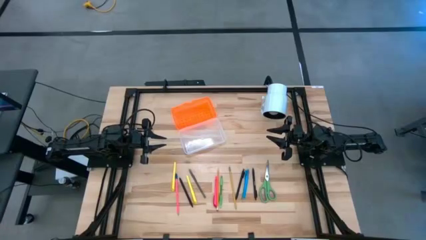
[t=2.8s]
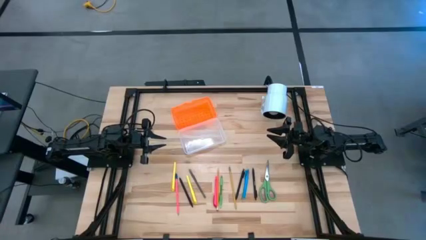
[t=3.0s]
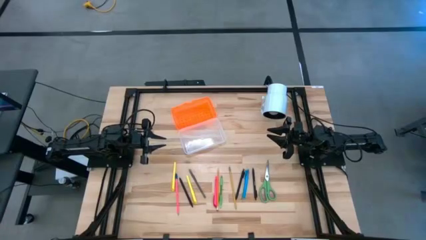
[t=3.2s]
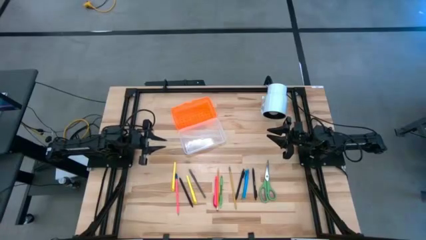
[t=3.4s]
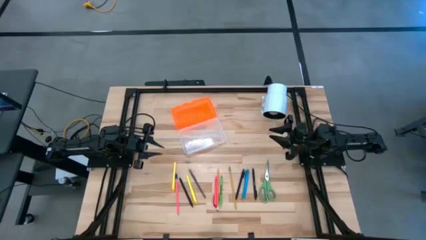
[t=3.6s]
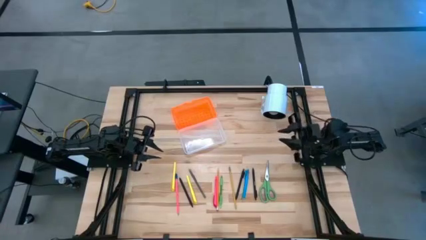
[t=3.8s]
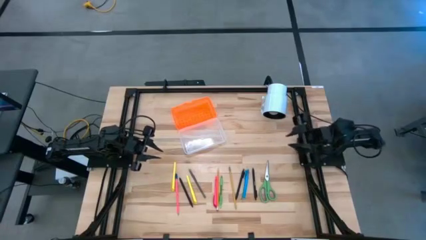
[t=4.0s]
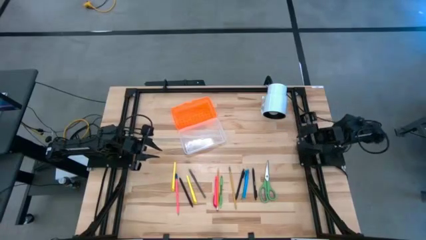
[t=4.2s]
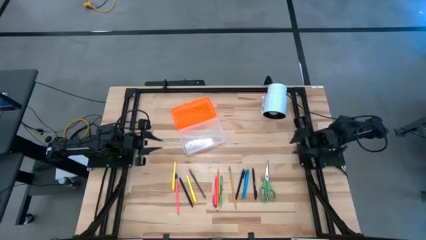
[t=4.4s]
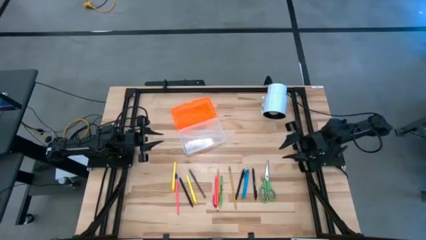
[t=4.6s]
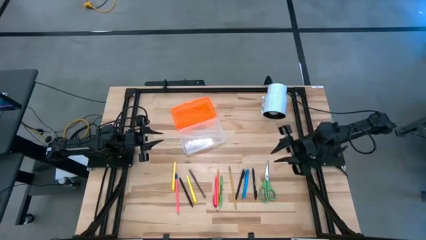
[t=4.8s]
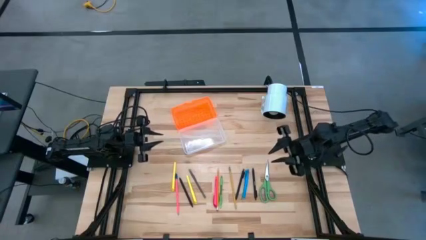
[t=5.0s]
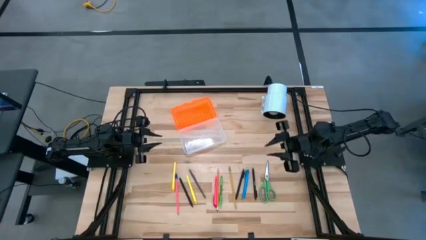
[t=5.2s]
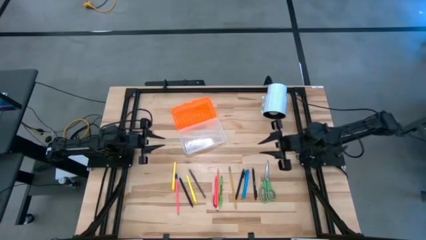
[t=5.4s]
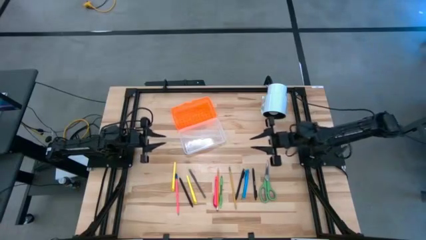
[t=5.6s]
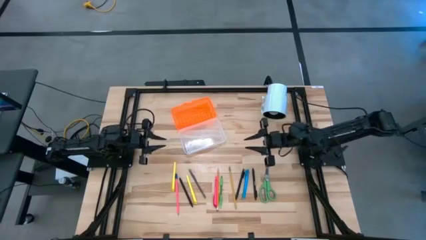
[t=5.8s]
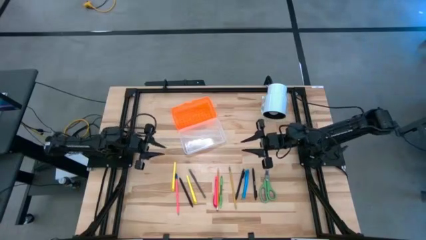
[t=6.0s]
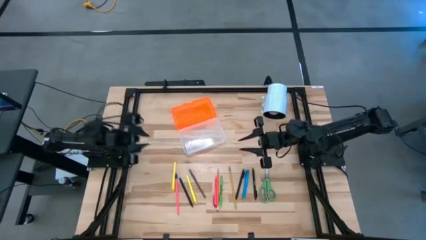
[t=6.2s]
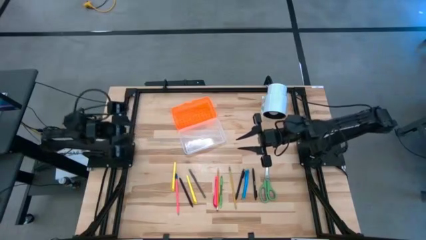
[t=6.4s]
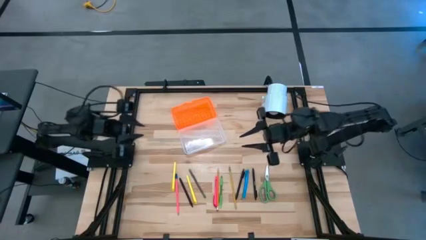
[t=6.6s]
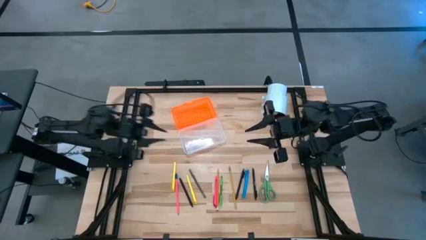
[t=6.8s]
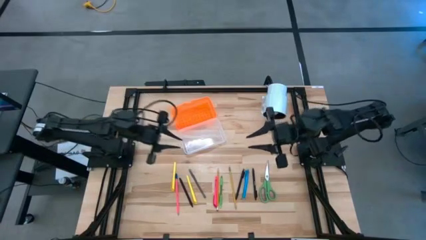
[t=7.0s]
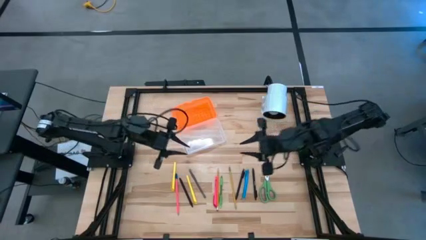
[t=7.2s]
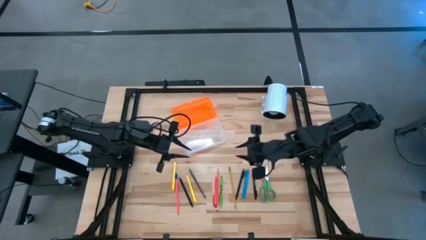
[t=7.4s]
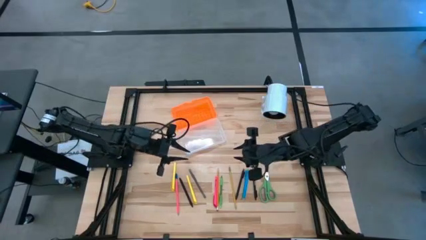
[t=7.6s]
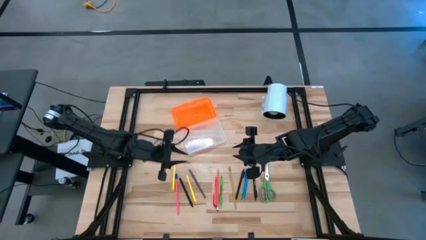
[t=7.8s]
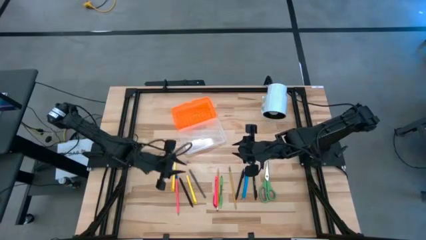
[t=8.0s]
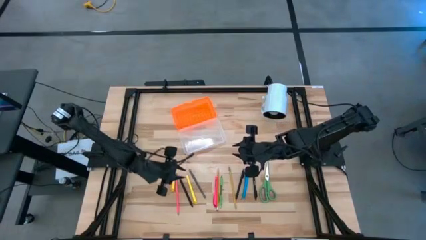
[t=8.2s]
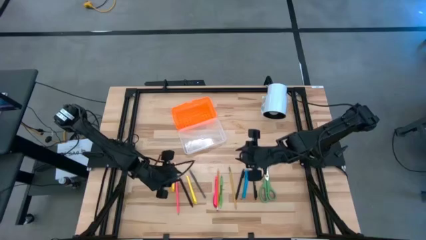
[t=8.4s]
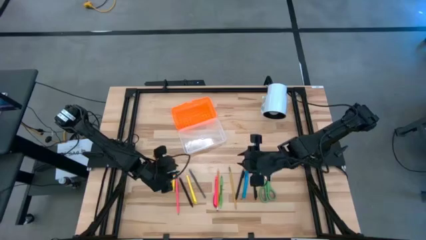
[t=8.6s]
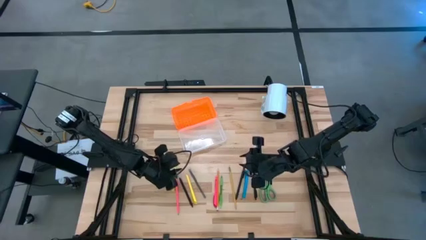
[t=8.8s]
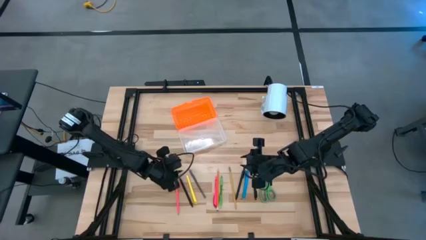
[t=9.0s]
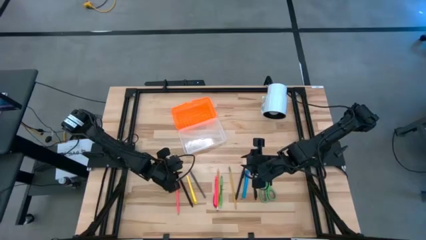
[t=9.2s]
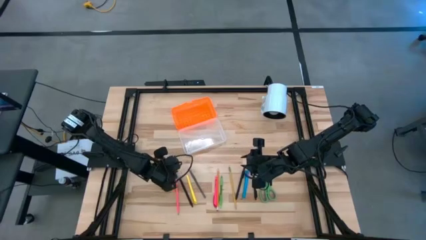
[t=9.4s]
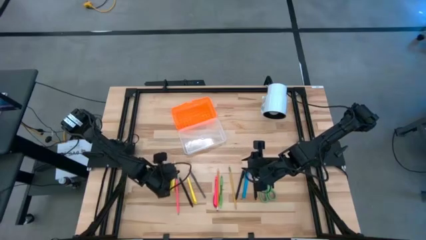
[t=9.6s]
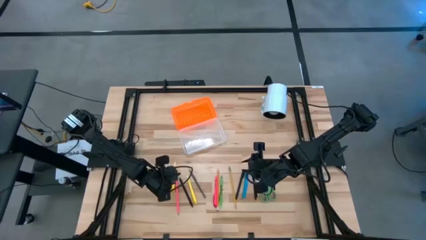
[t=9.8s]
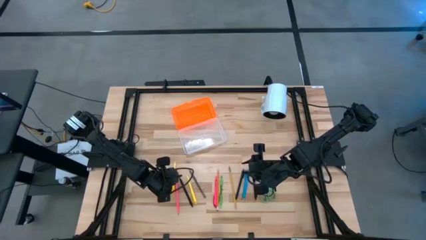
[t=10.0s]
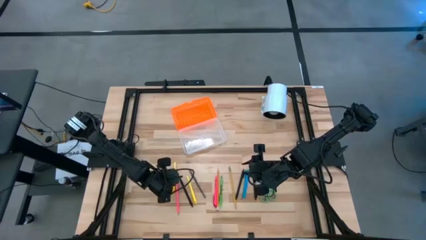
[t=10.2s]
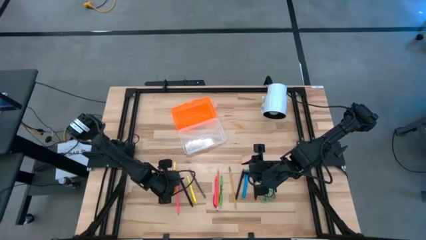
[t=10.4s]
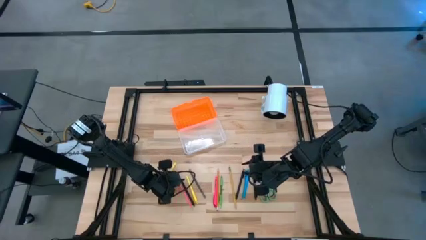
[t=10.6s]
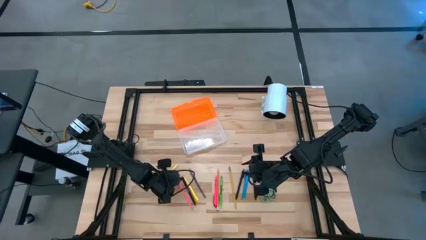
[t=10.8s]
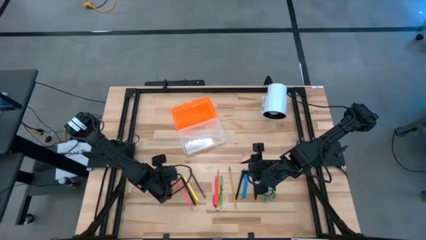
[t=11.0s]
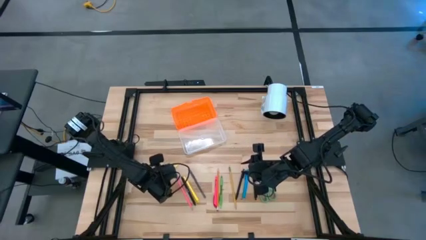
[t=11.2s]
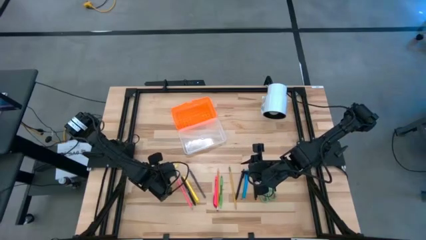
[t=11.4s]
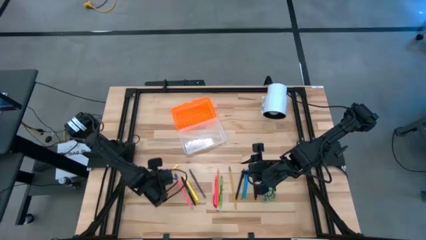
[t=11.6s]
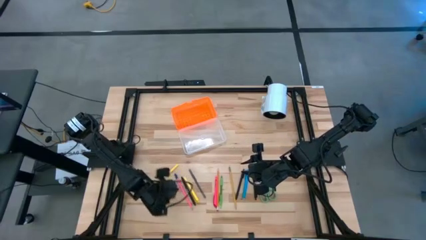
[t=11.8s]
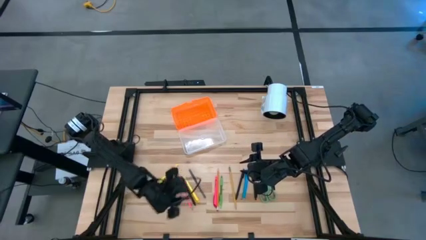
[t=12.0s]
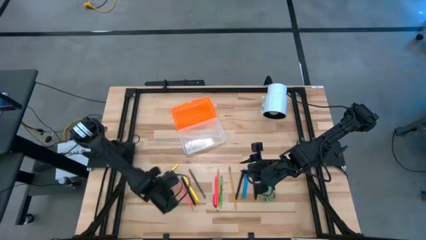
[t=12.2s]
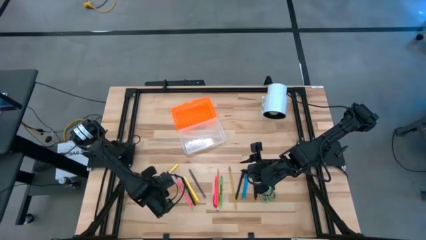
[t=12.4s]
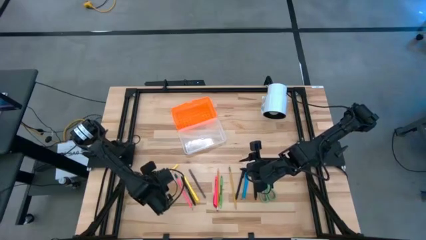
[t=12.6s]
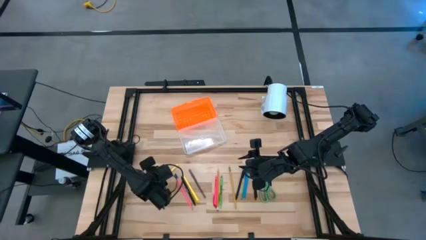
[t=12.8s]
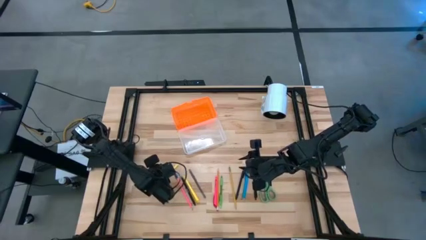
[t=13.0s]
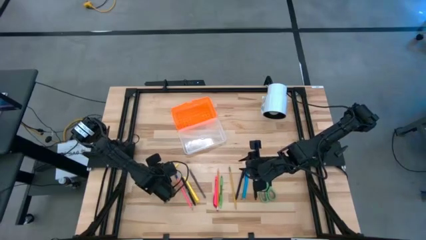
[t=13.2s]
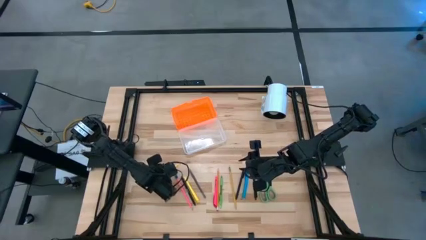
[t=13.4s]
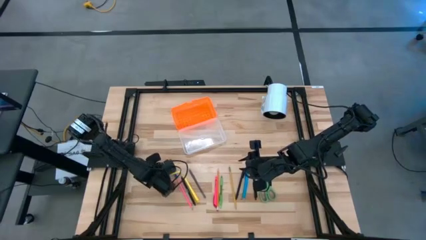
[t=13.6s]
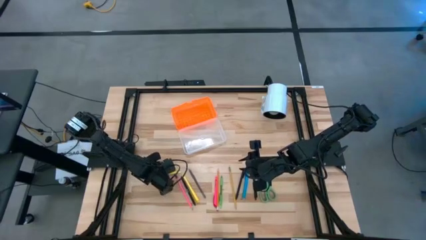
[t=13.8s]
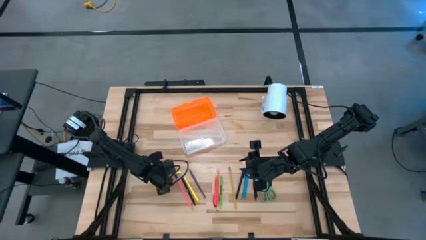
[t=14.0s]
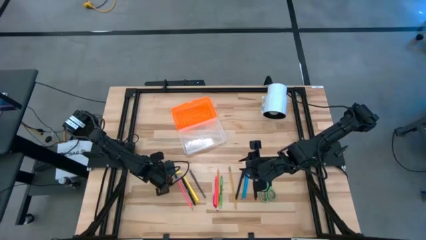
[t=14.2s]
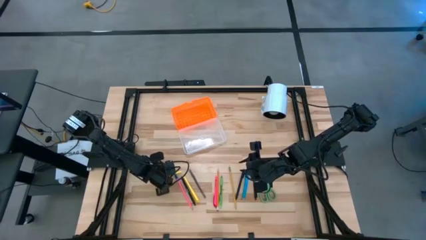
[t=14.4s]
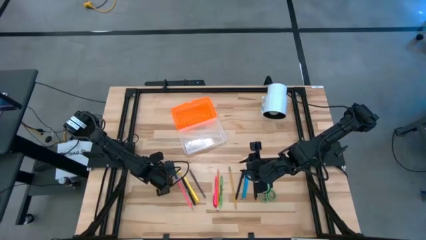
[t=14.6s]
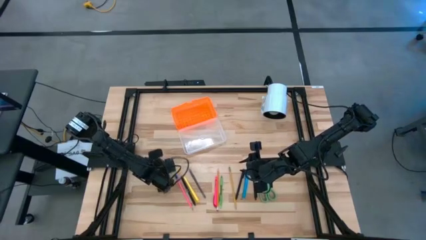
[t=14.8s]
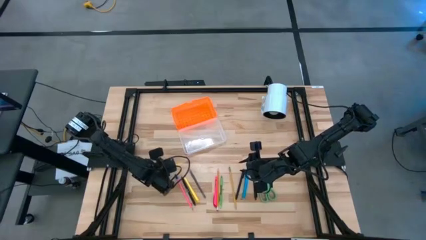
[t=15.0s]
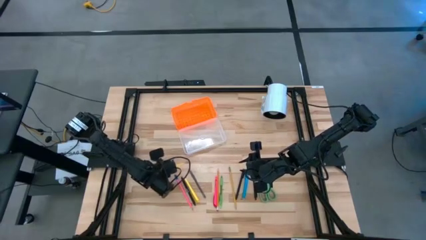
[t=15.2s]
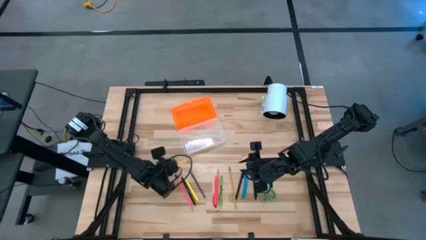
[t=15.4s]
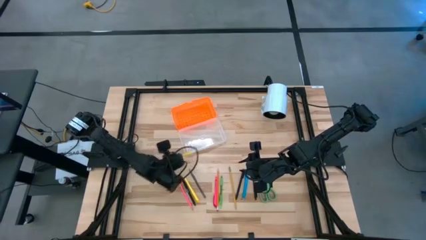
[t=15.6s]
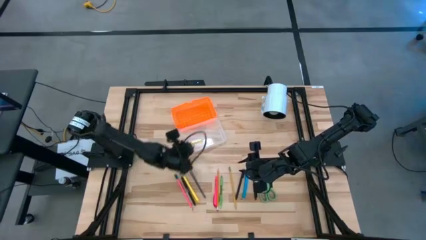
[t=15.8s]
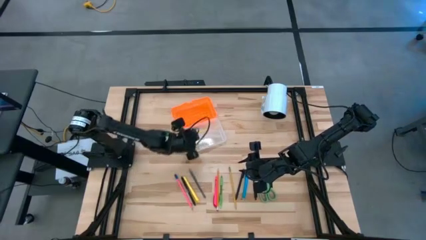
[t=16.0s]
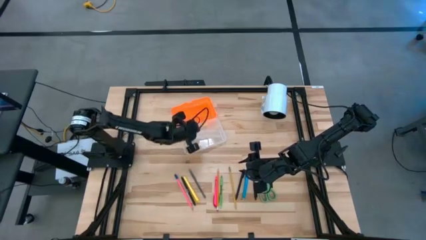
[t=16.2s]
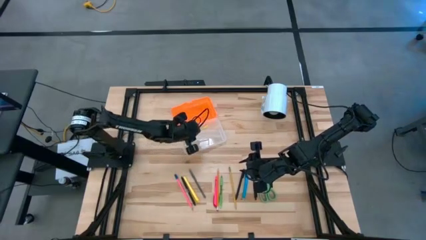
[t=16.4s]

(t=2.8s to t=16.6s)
Task: Pick & place school supplies into a supply box
Put the left yellow pen into the supply box
